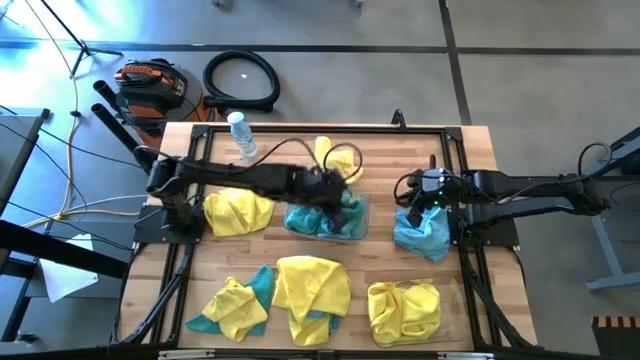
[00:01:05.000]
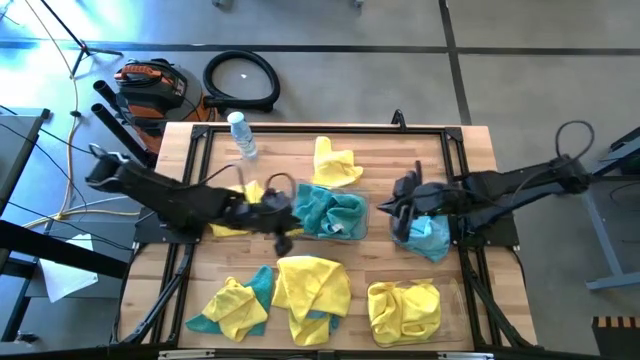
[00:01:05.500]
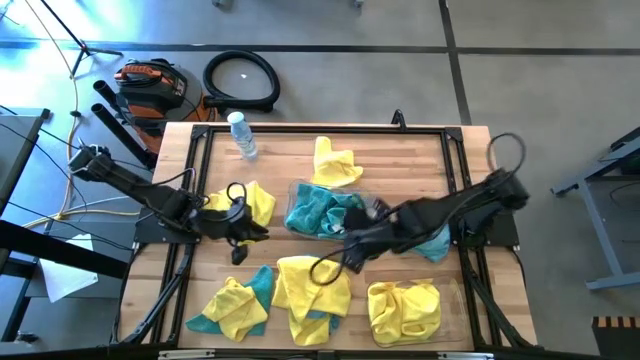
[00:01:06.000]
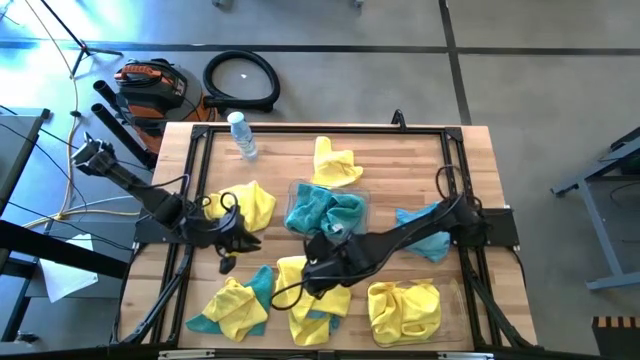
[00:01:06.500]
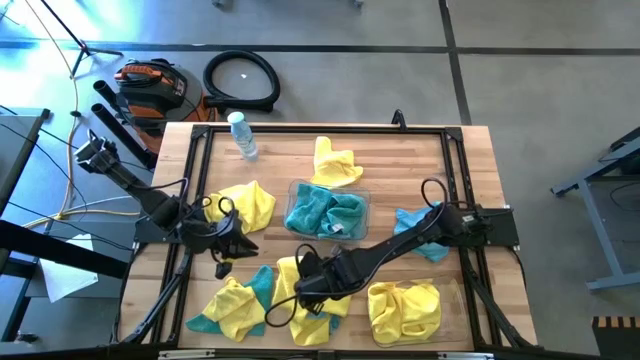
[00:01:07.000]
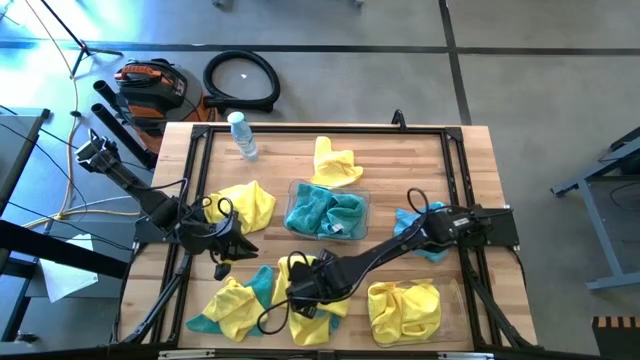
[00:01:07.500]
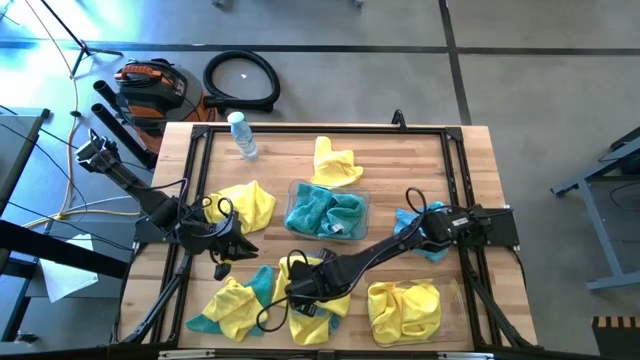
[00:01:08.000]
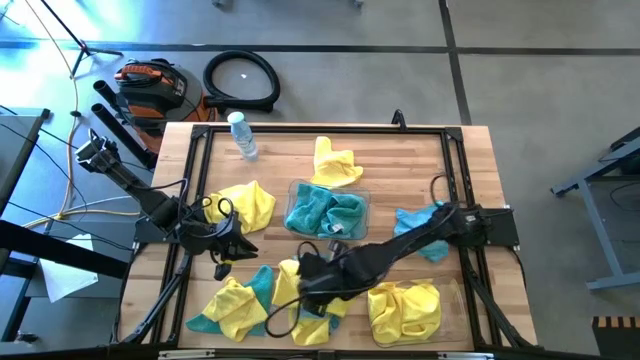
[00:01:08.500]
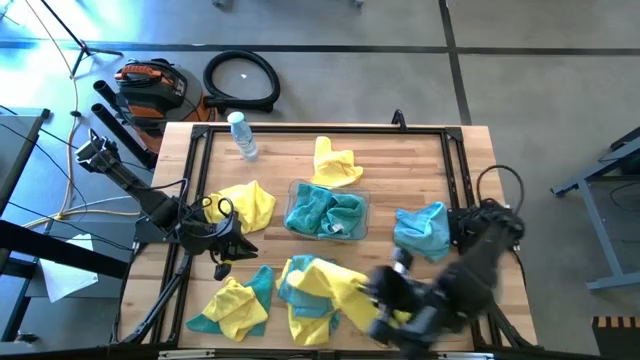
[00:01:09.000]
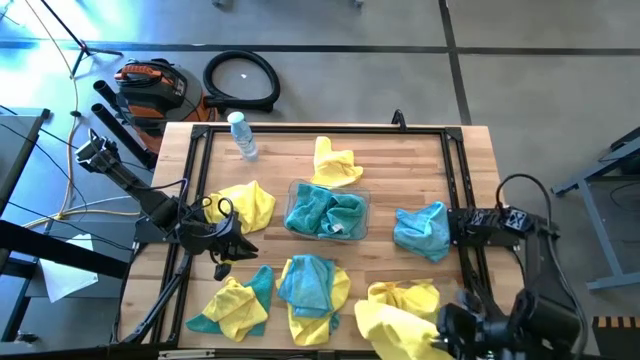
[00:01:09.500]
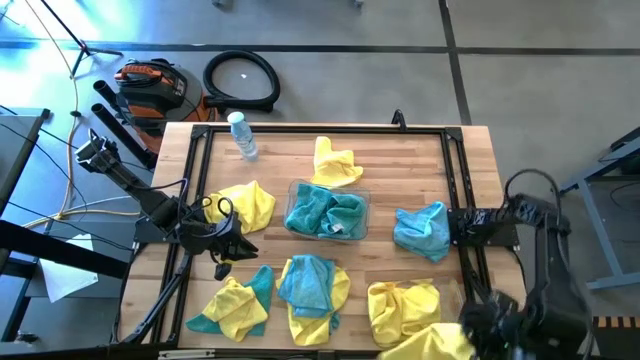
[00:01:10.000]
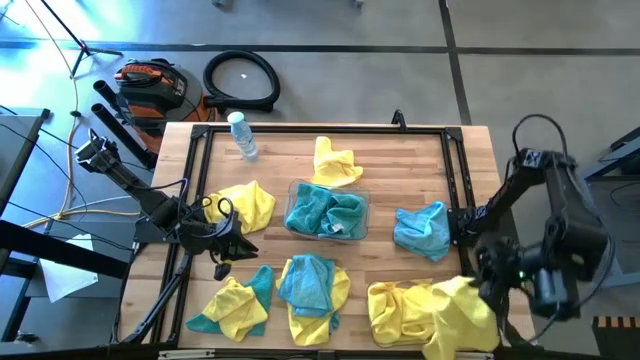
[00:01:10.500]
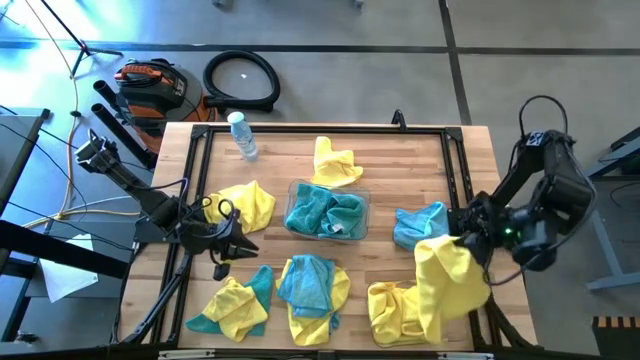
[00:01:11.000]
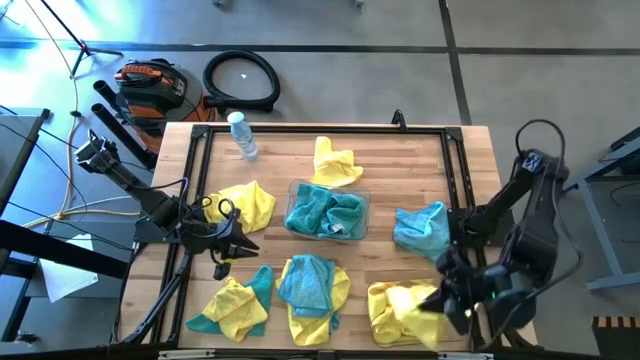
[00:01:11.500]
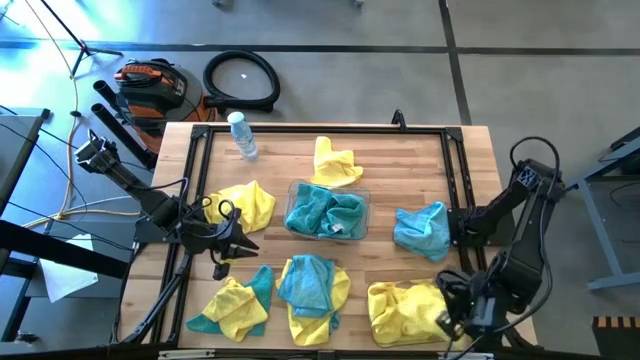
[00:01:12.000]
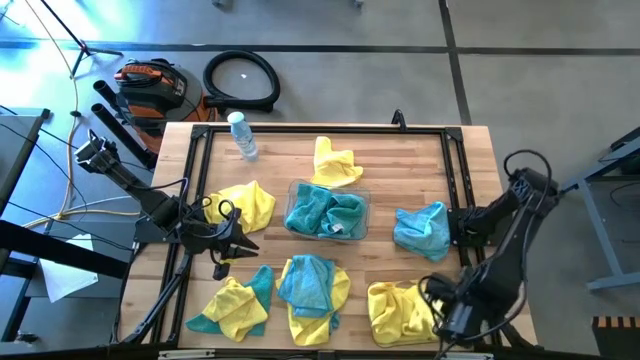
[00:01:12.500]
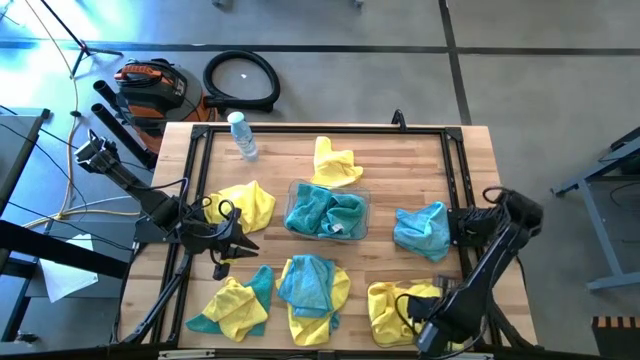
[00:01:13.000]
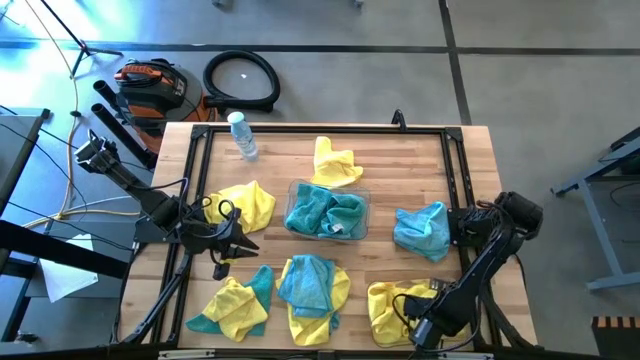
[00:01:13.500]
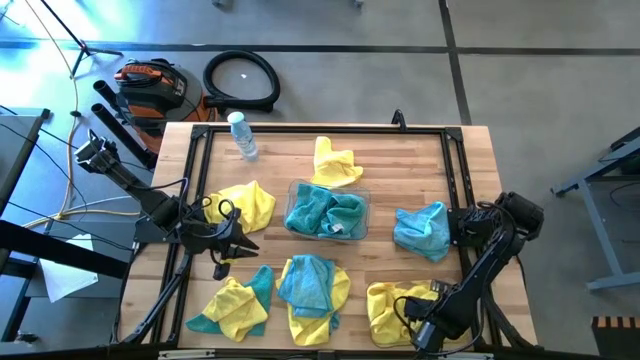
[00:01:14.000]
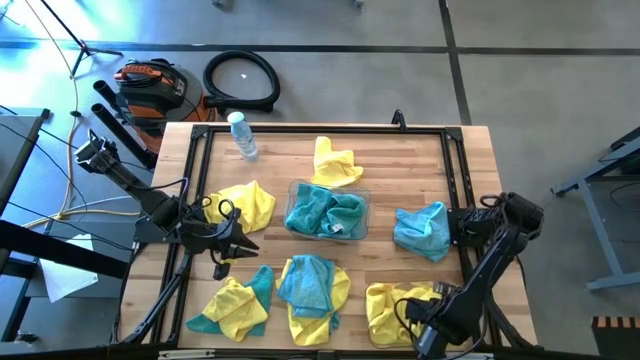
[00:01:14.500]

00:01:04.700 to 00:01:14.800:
Task: Sort microfiber towel by color & place in baskets
Put the yellow towel in the bottom transparent bin

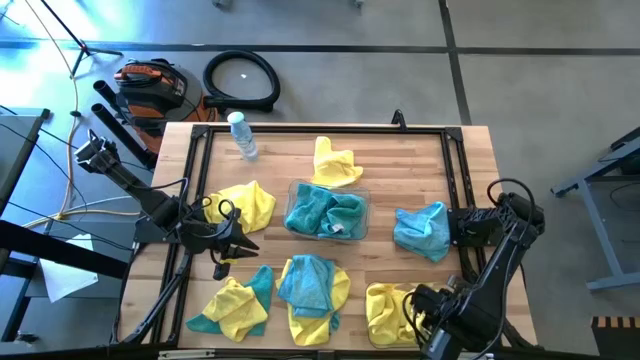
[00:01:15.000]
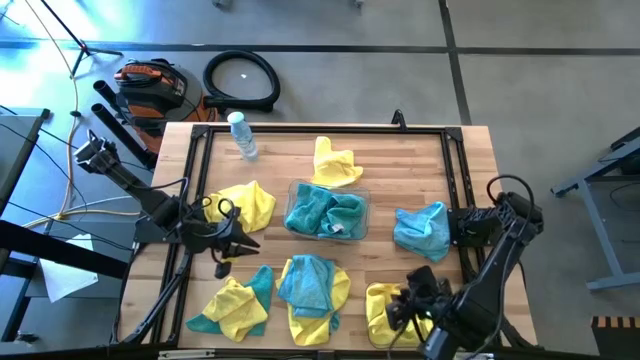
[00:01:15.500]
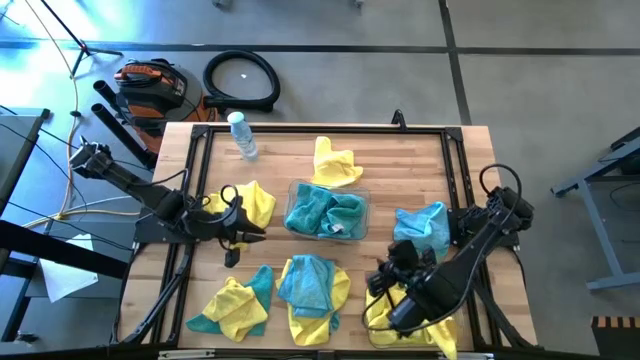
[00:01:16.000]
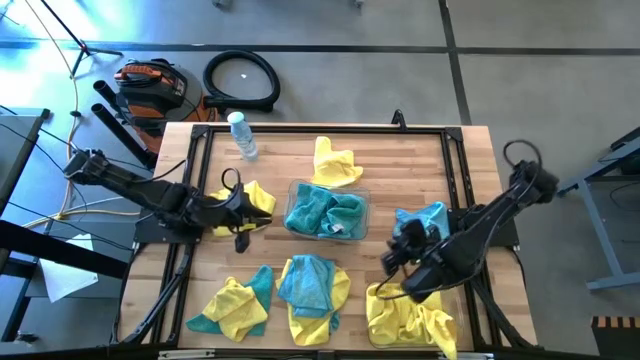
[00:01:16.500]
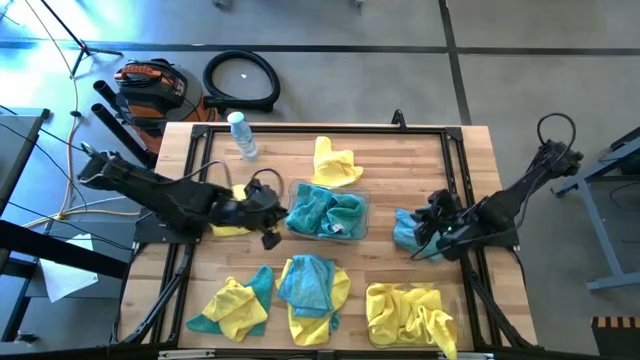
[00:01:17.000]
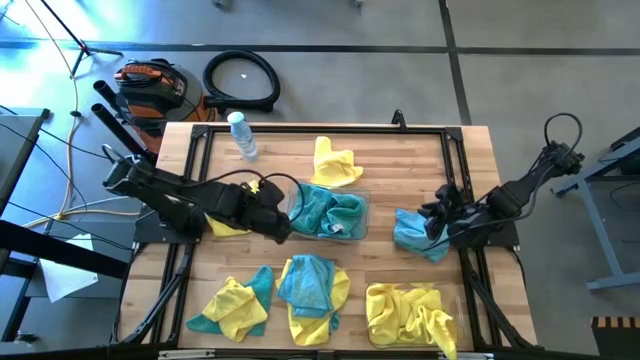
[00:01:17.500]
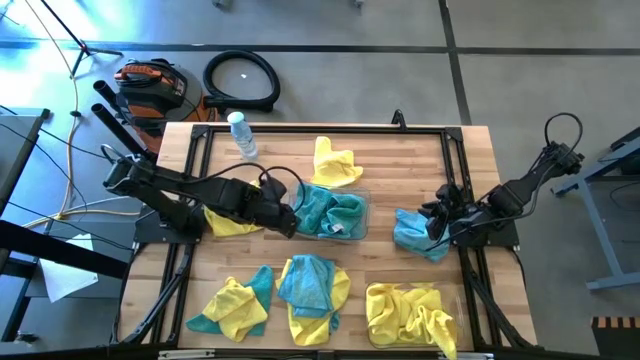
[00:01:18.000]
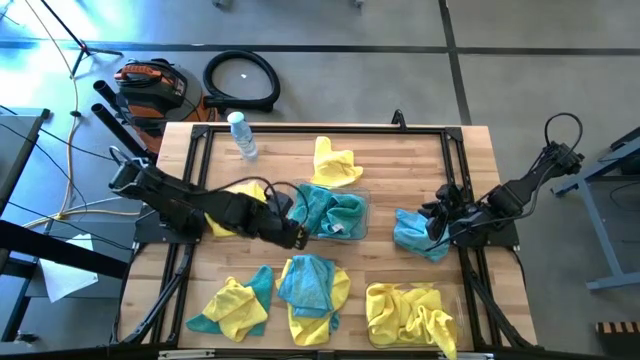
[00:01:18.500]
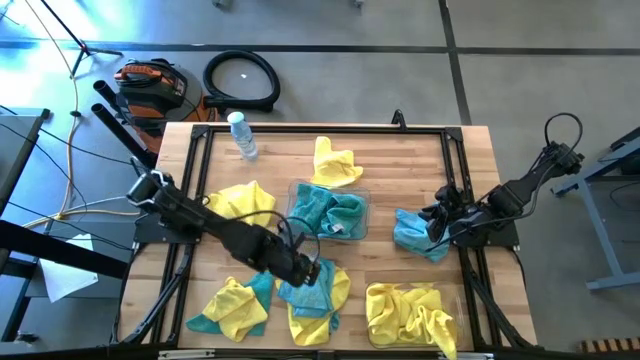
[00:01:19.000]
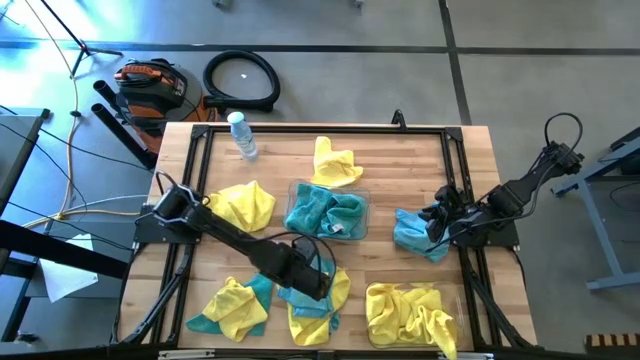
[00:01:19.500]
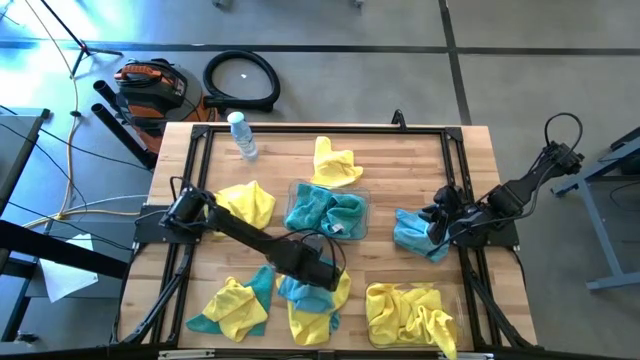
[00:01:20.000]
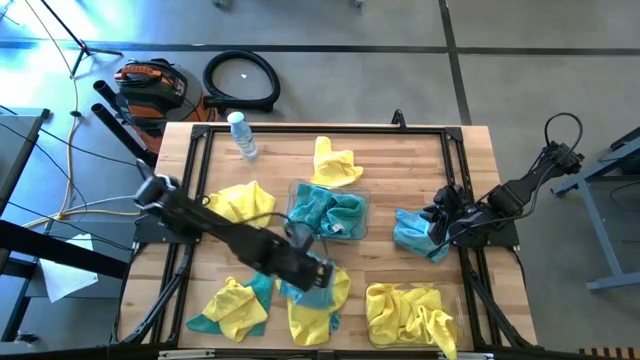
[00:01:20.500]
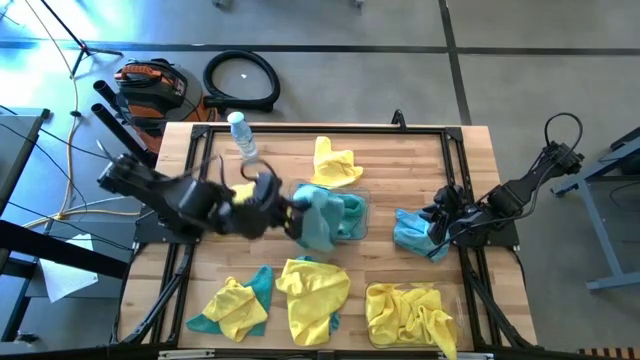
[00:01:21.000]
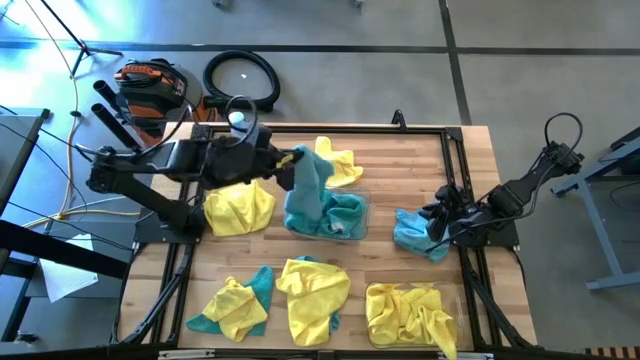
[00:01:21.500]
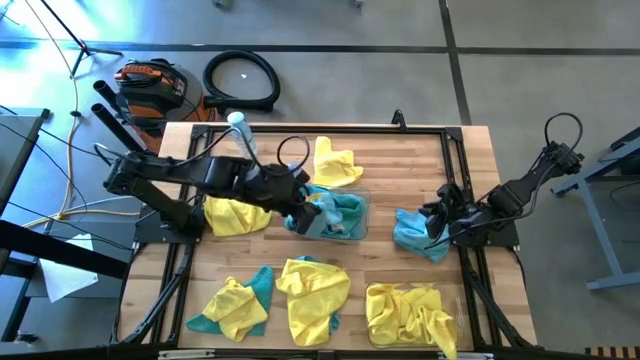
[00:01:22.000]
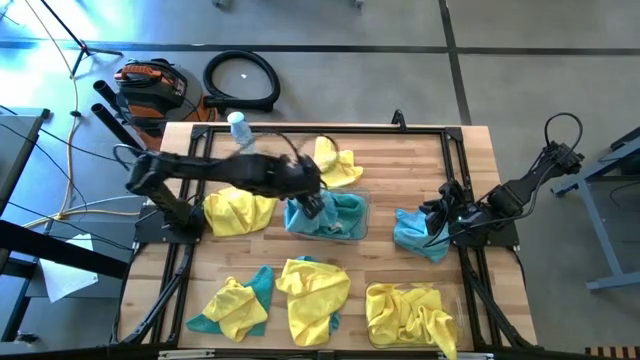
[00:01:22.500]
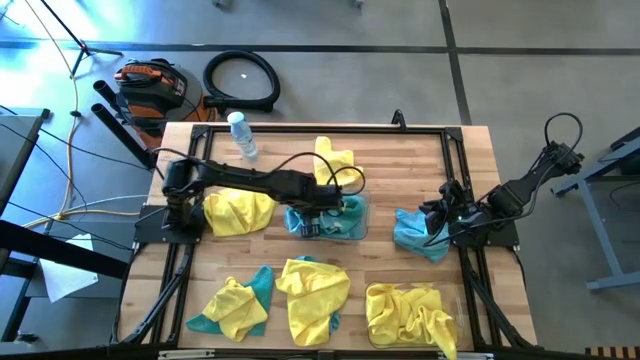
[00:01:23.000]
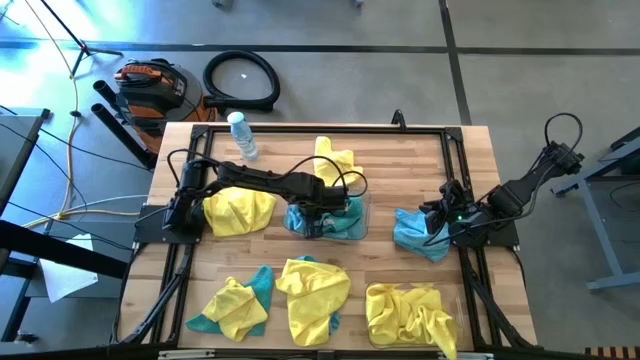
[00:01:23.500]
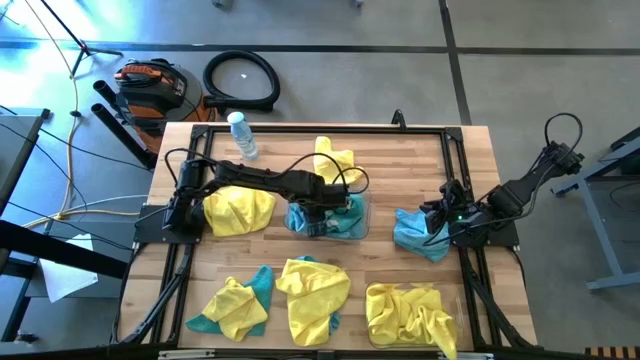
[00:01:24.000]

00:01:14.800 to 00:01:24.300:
Put the blue towel in the top transparent bin

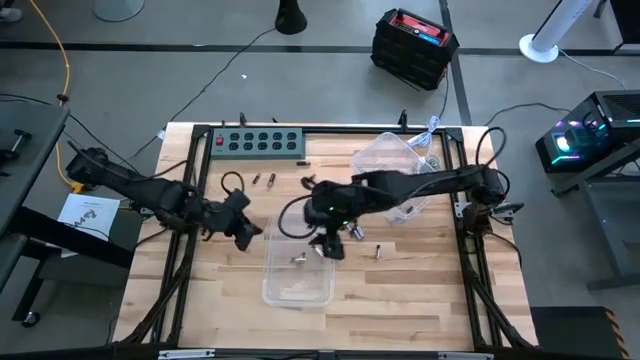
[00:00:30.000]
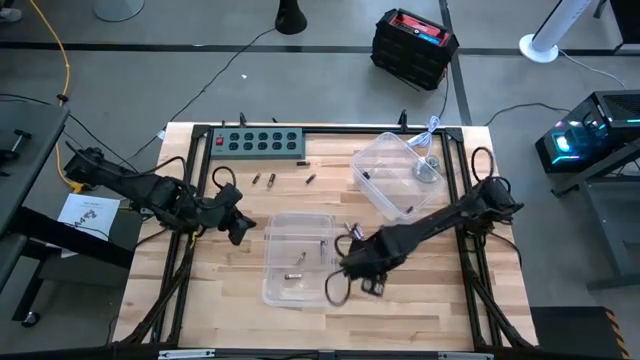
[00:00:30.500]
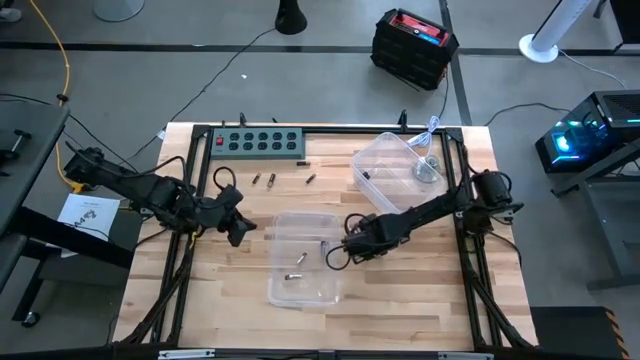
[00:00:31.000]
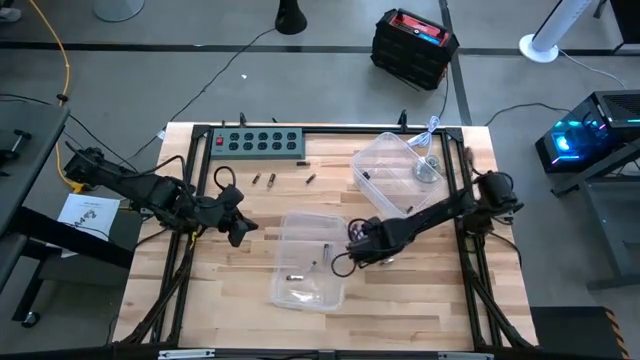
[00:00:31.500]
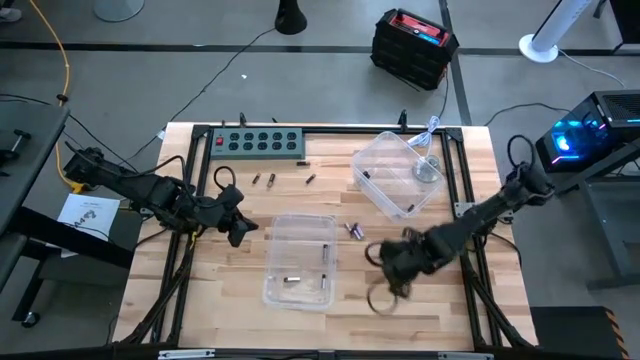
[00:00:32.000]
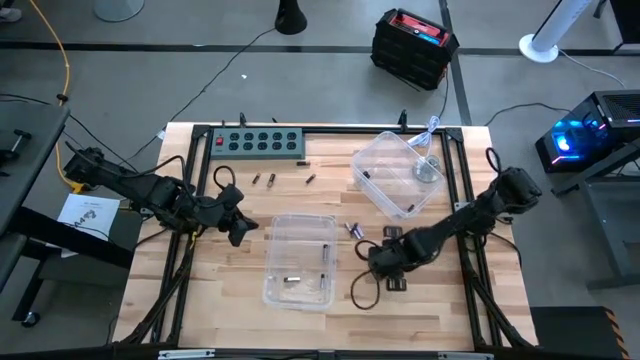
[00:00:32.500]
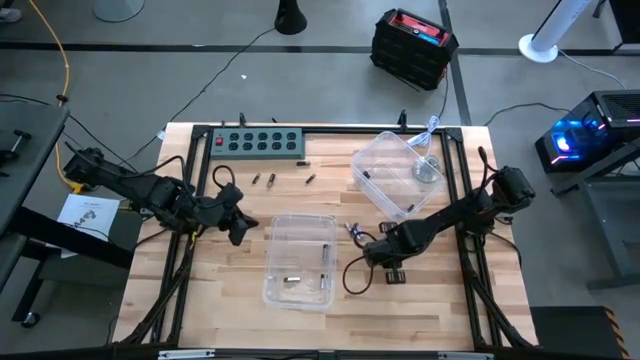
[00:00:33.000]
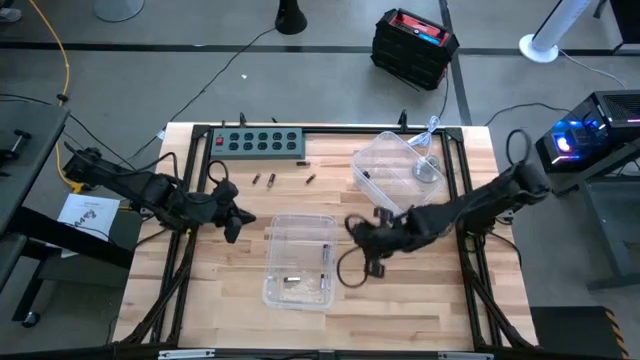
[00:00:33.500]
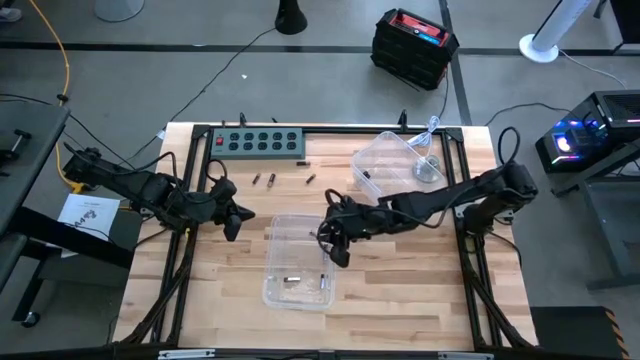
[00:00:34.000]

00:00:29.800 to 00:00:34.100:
Task: Sort batteries
Put the silver battery into the left transparent bin
